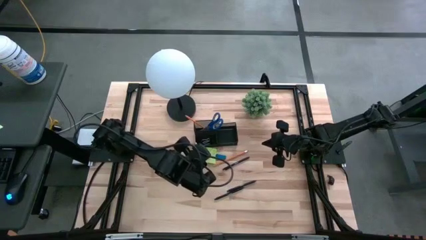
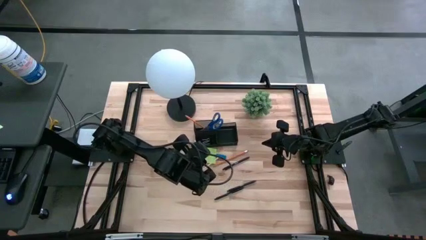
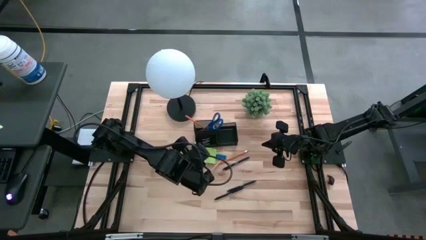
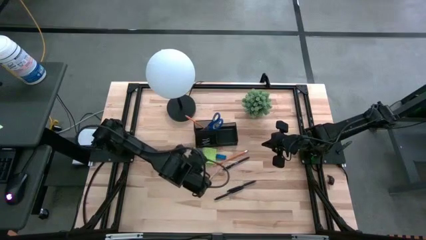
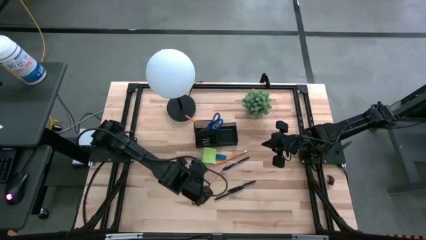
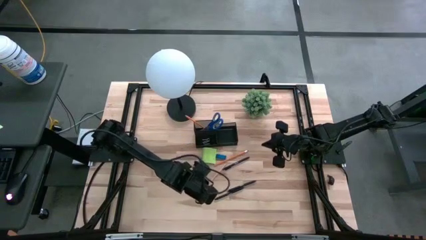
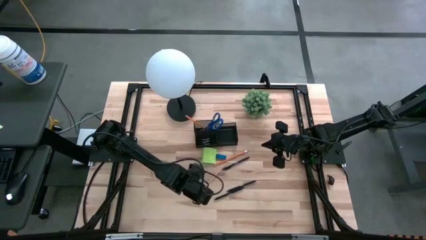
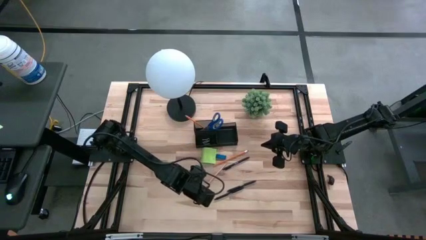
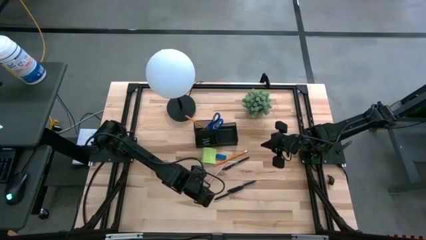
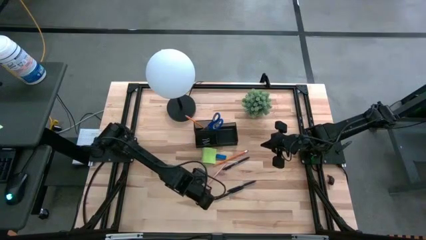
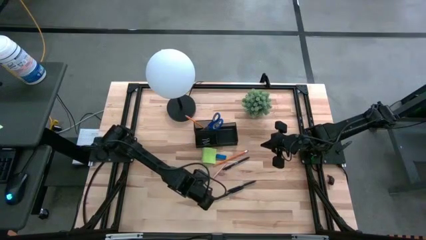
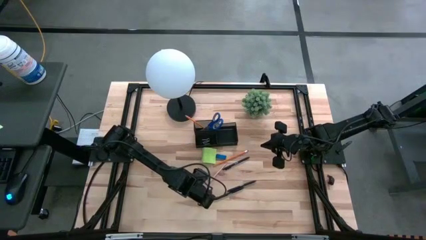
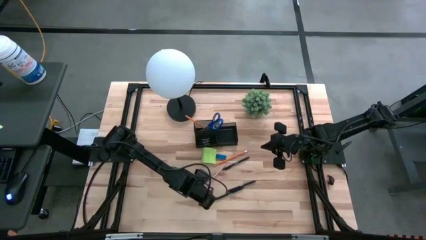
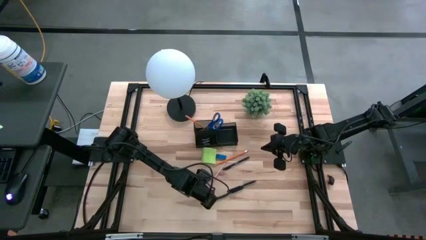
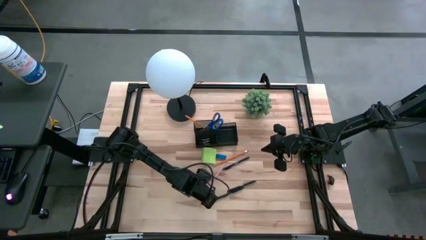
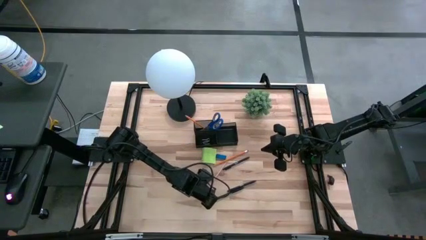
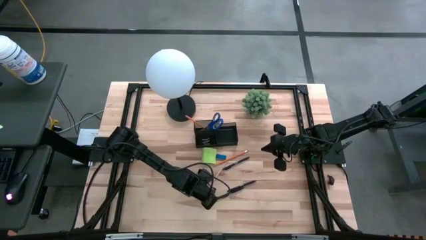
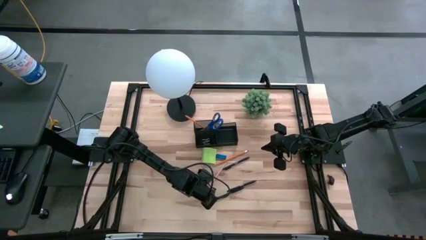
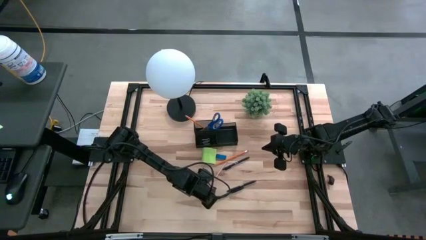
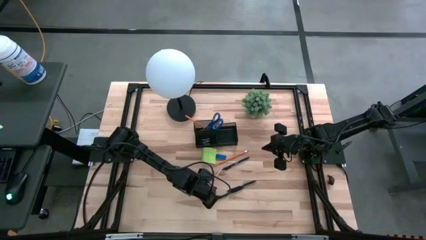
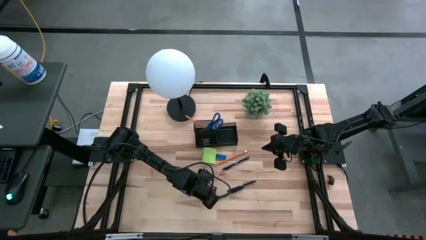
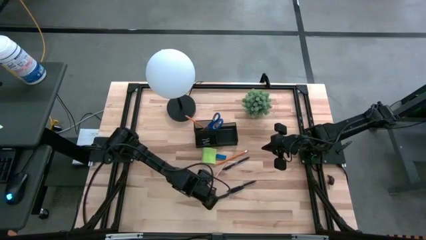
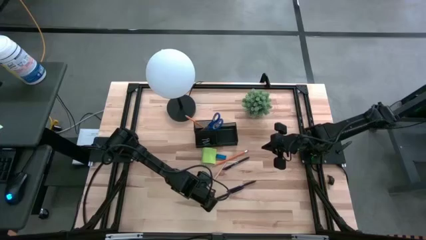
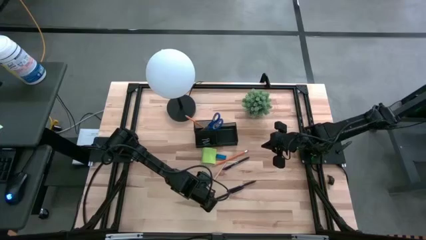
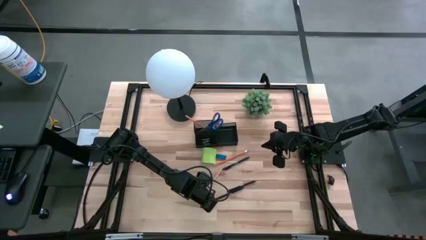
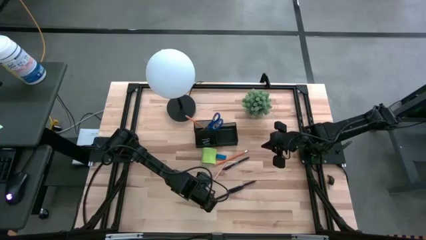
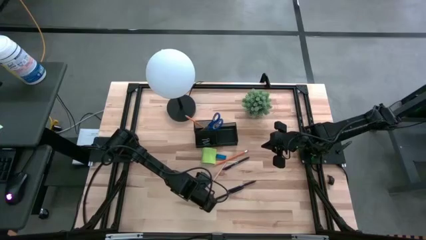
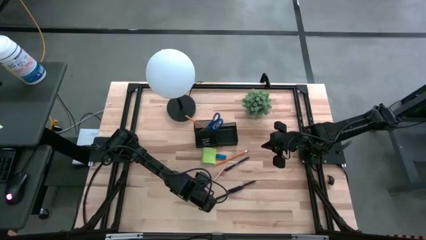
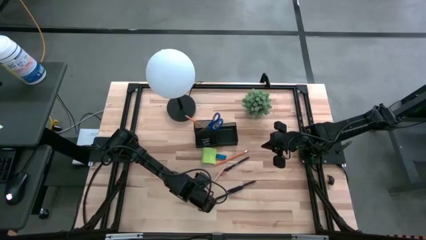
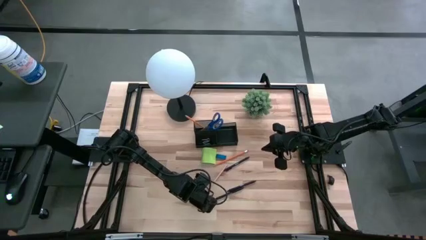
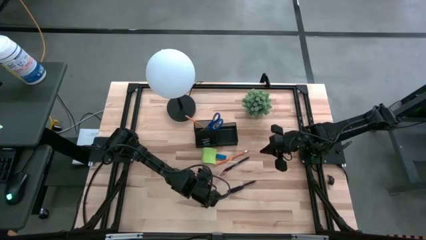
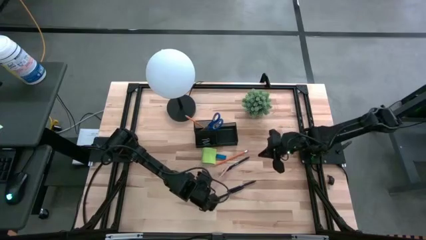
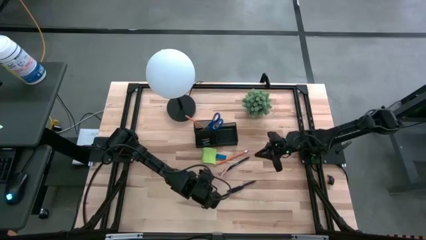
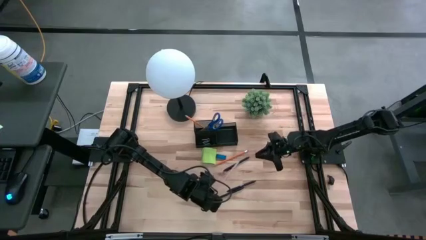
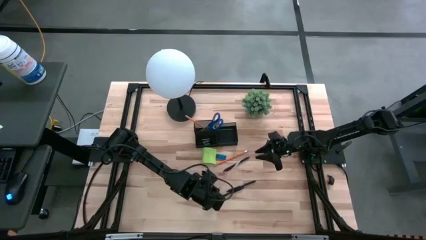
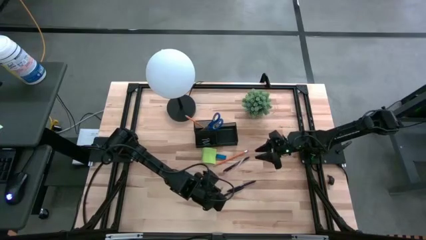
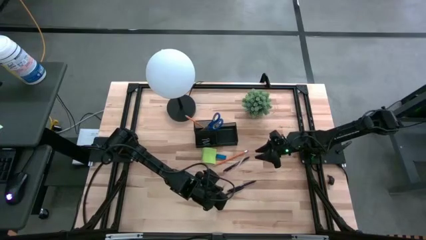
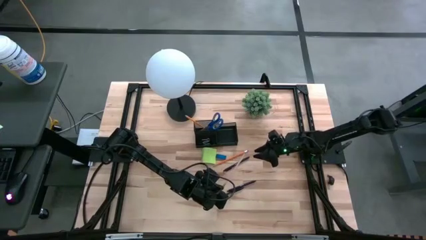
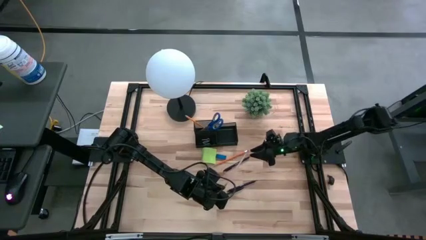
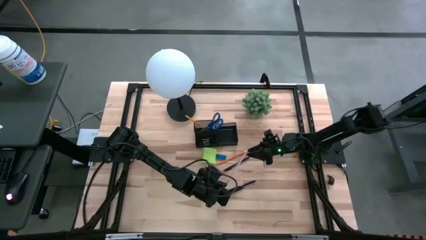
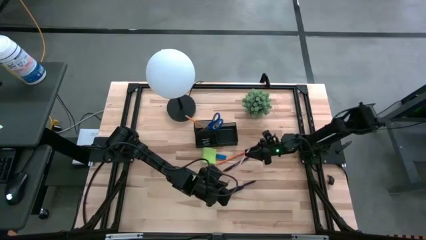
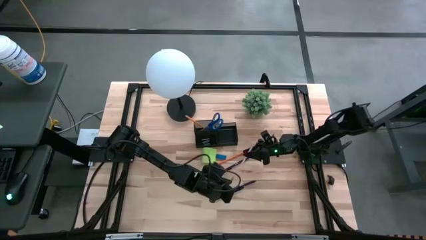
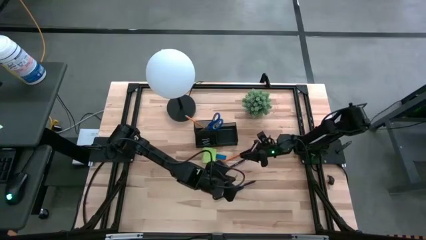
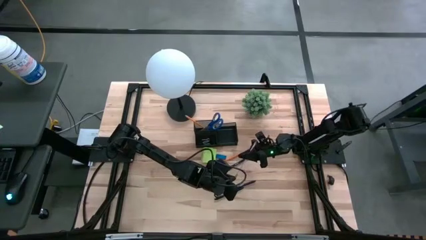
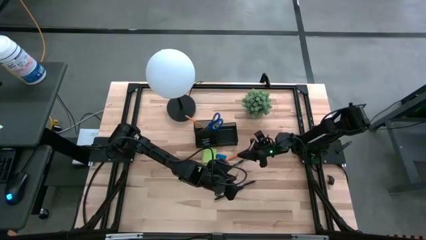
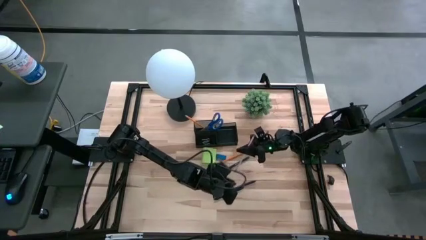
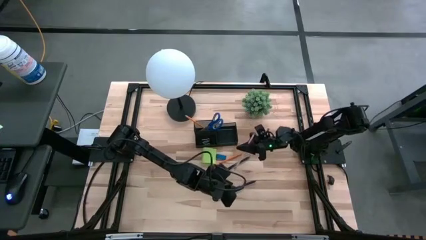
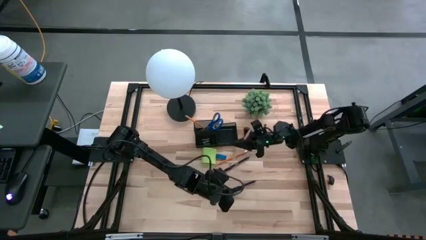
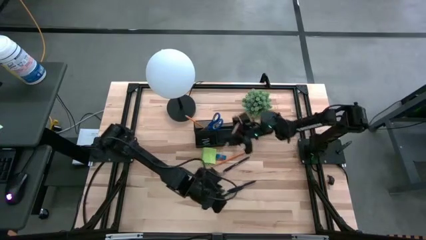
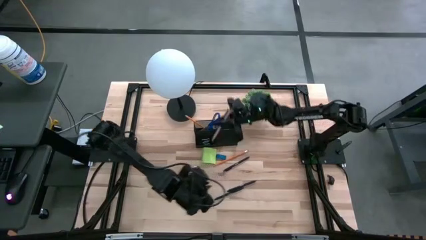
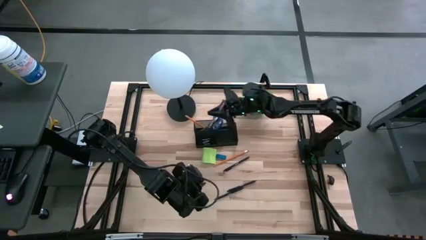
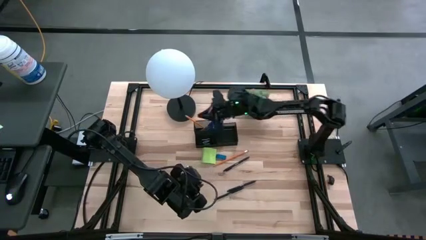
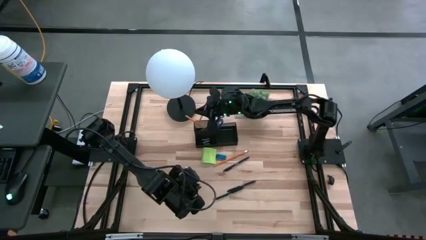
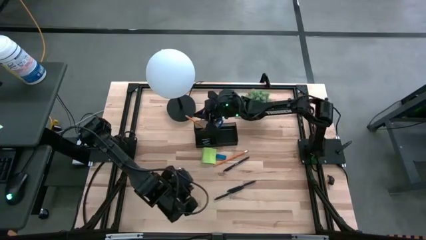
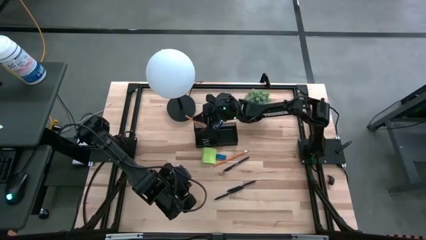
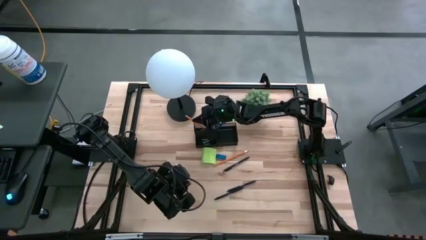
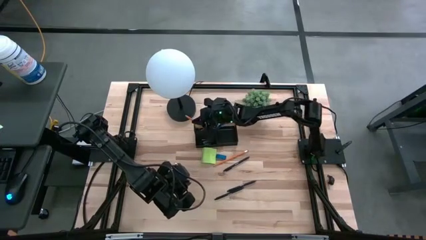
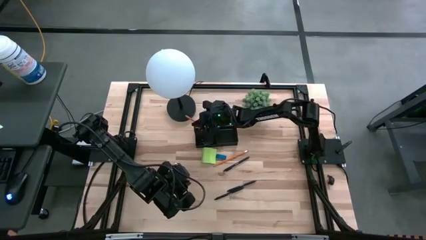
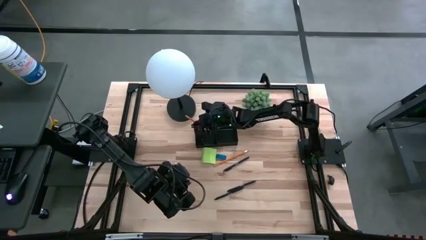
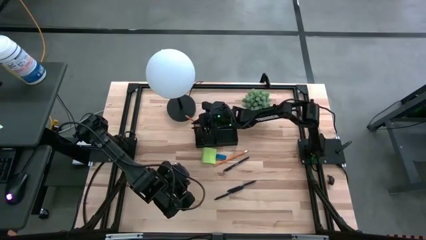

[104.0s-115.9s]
Task: Pick and place office supplies into organizer
Put the pink pencil into the top left side of the desk organizer
